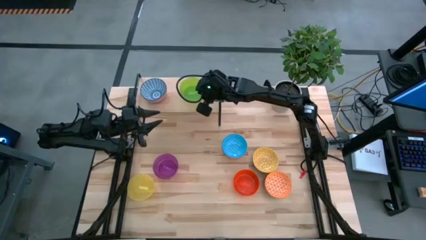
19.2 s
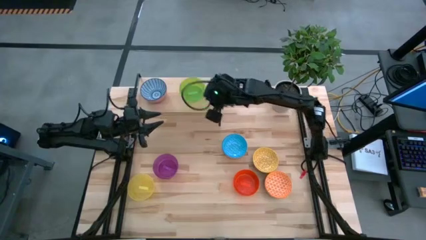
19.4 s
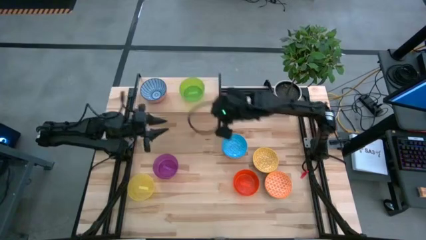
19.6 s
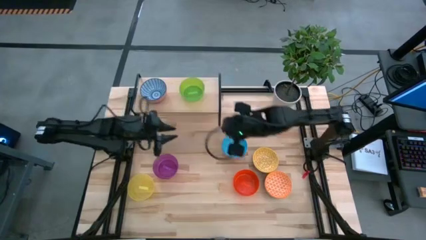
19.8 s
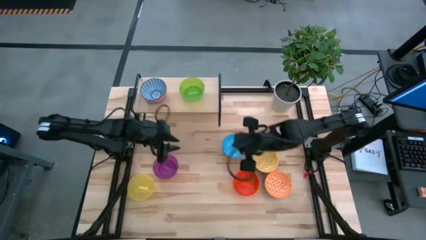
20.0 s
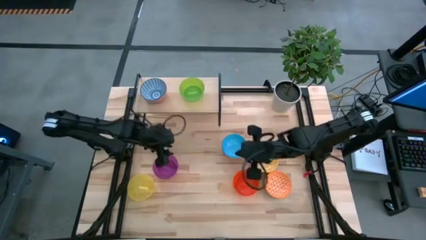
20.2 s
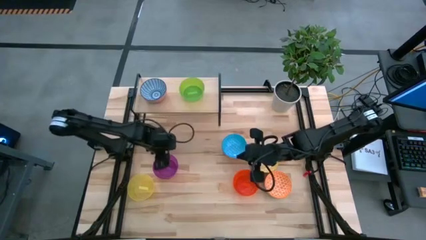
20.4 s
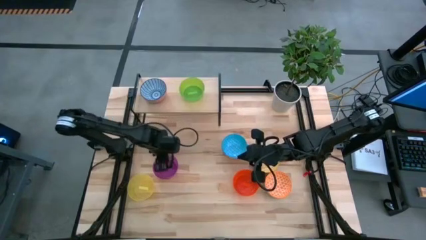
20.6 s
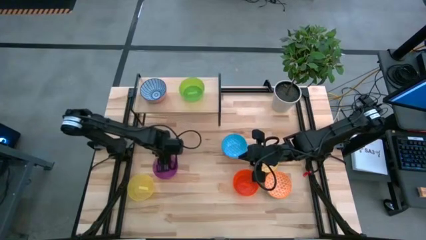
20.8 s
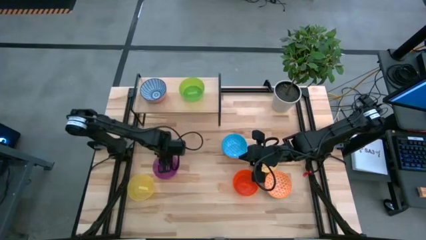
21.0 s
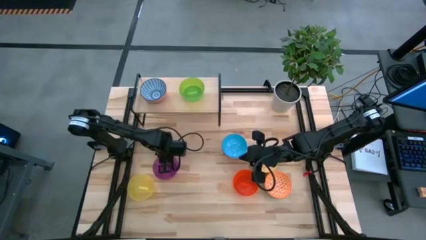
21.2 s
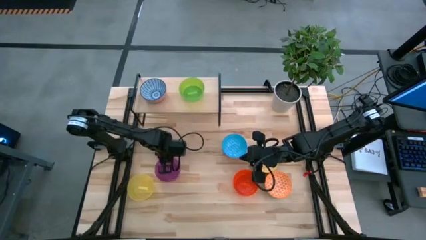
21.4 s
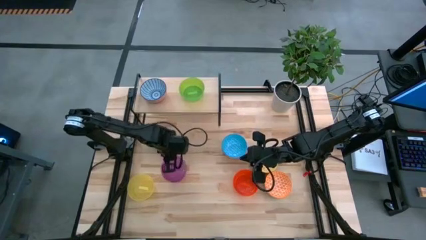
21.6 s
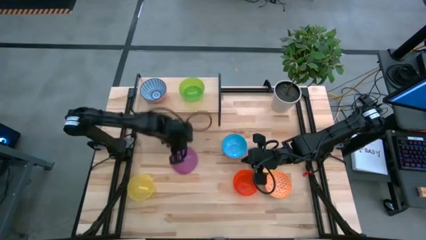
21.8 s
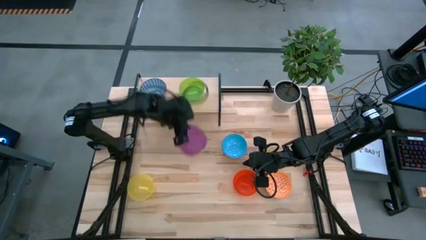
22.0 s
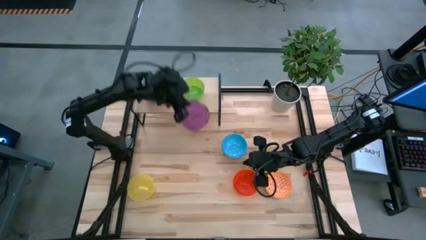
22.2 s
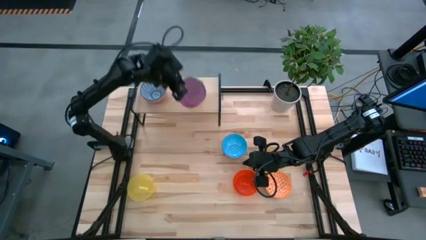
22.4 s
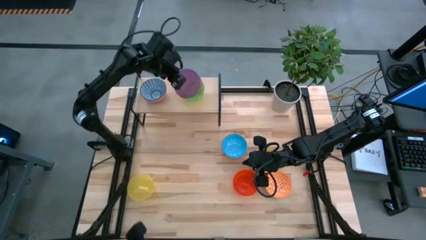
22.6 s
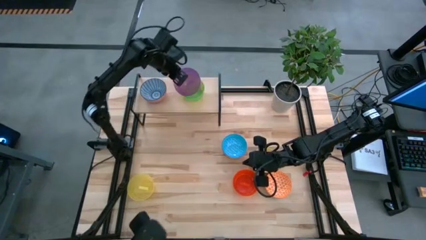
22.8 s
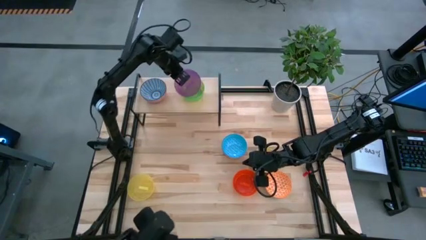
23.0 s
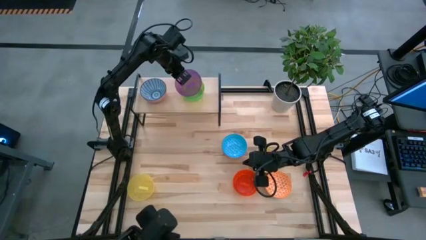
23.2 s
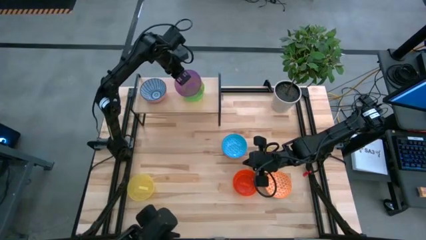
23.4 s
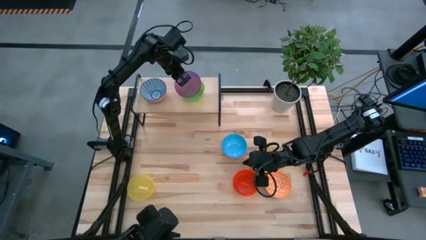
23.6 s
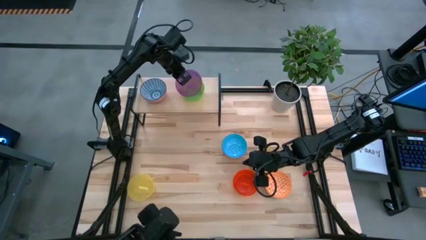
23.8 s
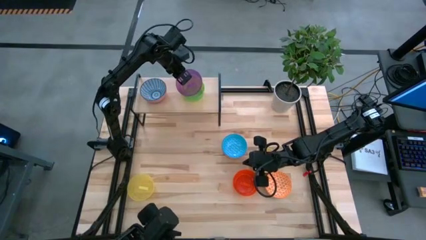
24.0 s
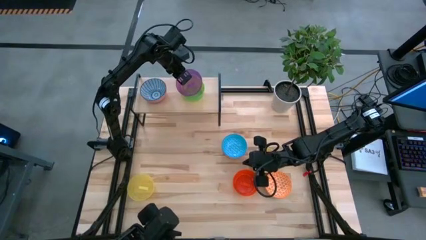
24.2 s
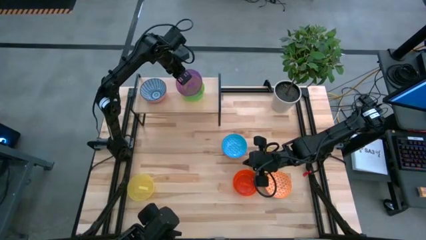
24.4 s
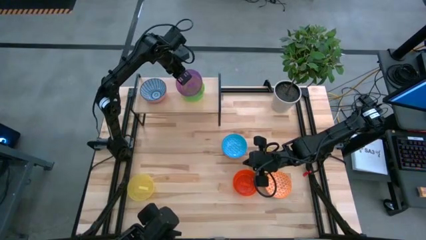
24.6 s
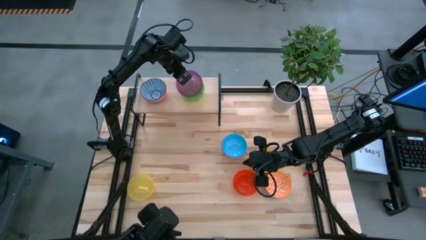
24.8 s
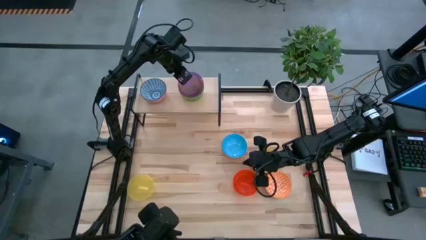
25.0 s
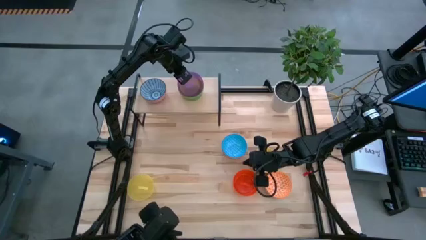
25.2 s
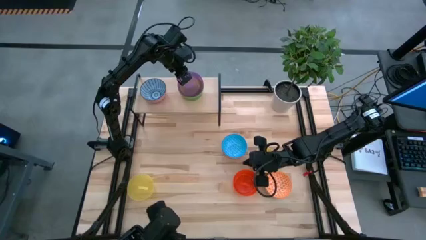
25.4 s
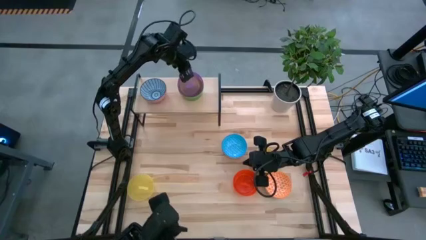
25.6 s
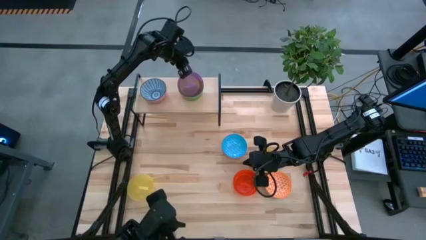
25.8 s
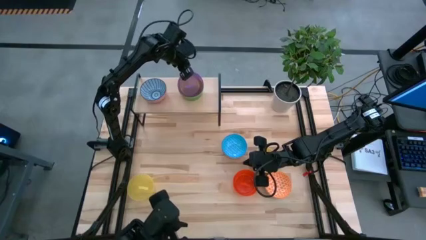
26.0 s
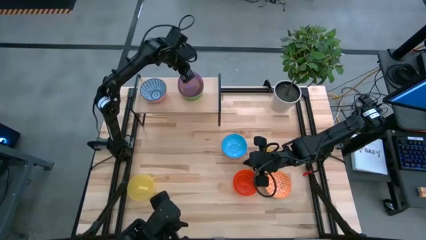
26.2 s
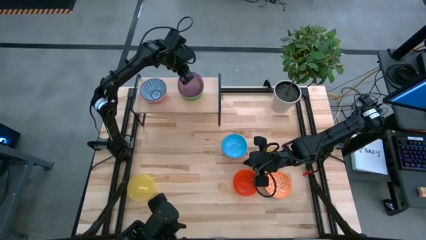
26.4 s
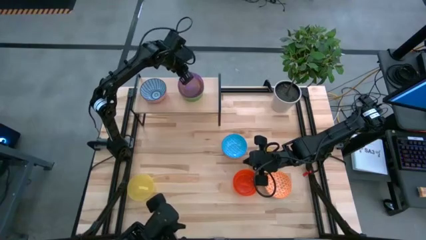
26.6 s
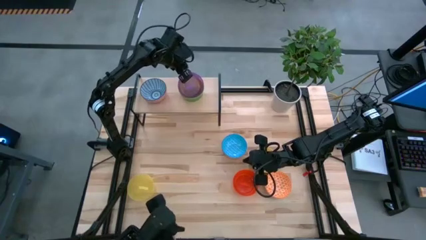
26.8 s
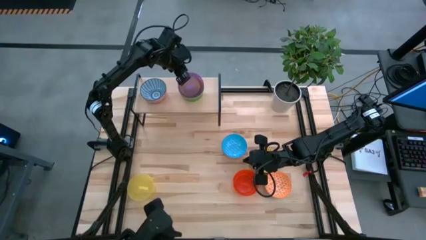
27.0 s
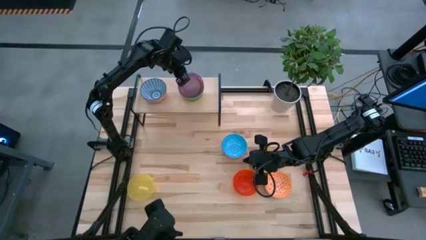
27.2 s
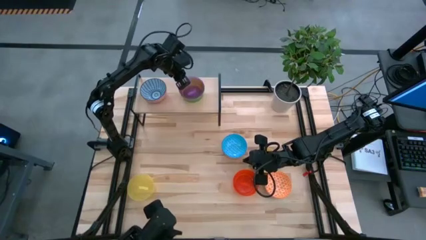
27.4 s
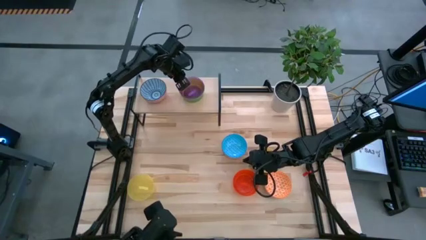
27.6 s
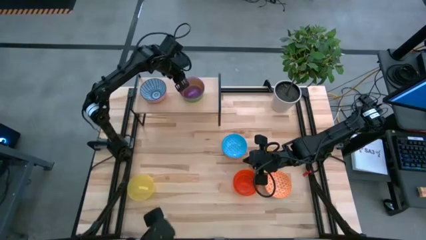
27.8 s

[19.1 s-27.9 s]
Task: Place and stack bowls onto a shelf
Stack the violet bowl on top of the green bowl on the shelf

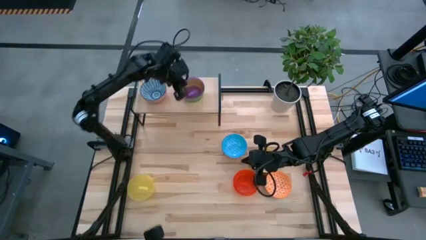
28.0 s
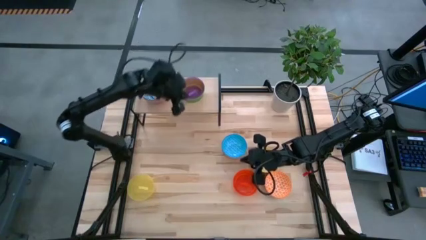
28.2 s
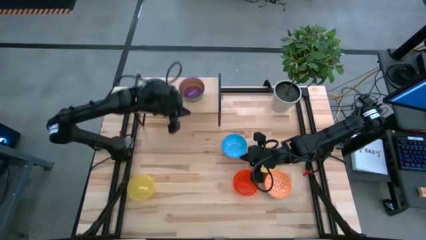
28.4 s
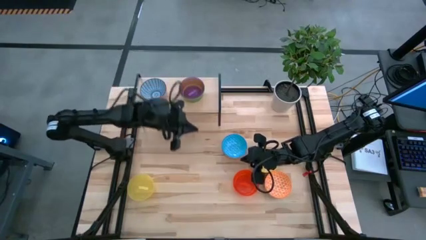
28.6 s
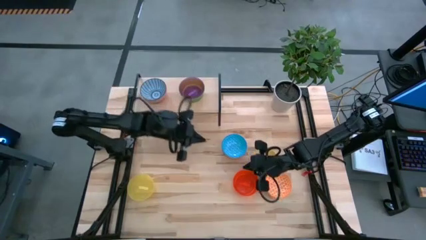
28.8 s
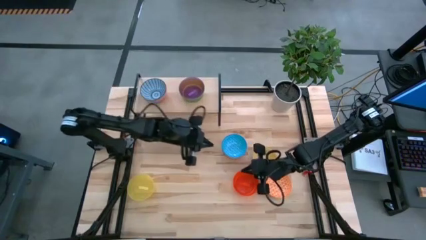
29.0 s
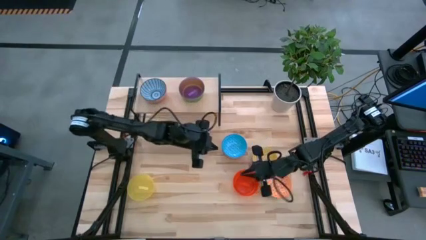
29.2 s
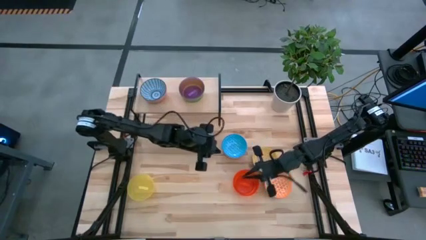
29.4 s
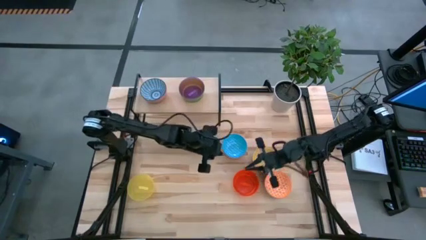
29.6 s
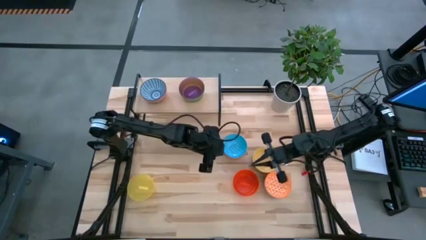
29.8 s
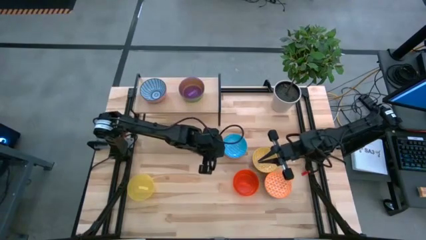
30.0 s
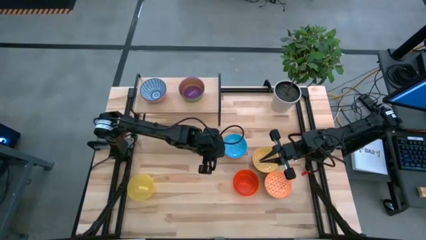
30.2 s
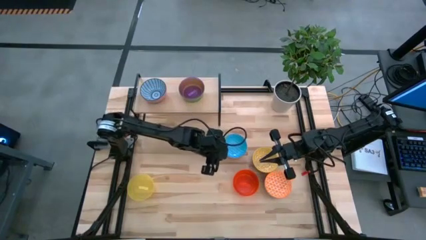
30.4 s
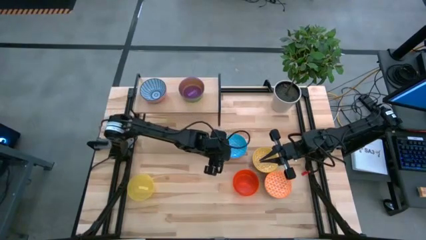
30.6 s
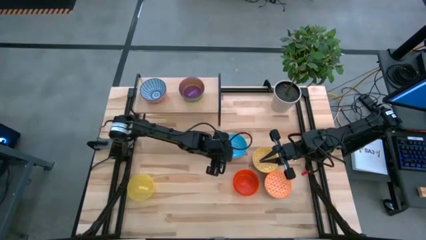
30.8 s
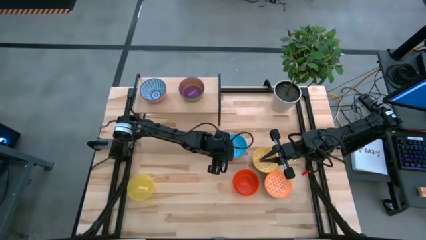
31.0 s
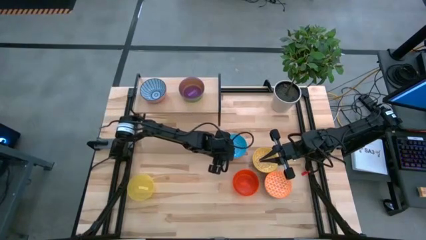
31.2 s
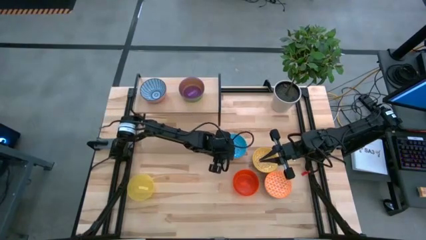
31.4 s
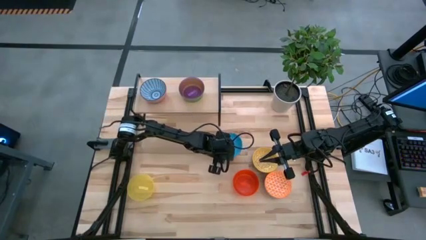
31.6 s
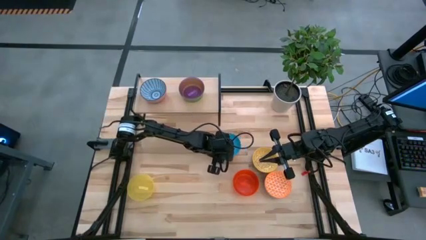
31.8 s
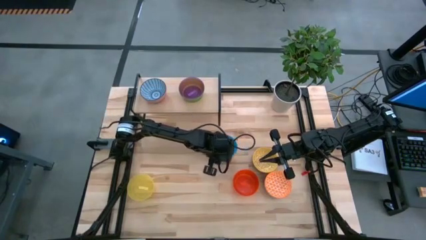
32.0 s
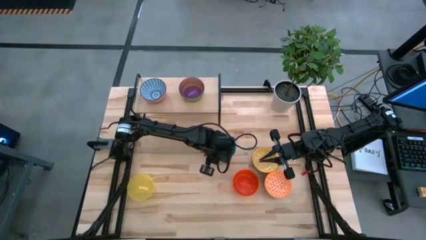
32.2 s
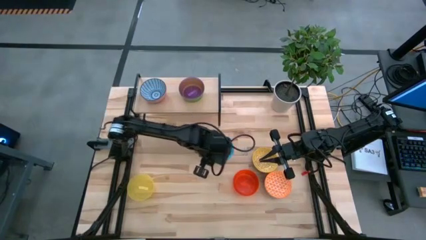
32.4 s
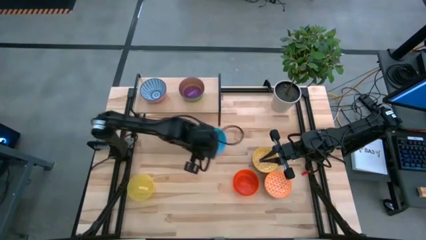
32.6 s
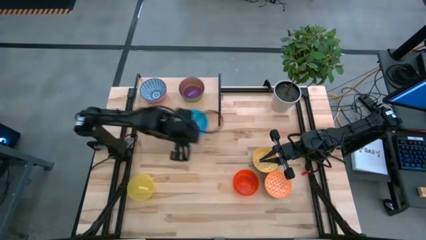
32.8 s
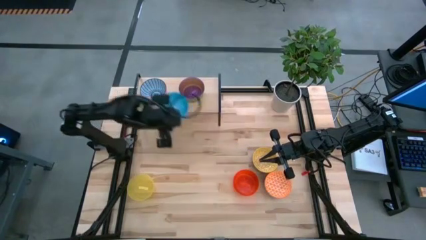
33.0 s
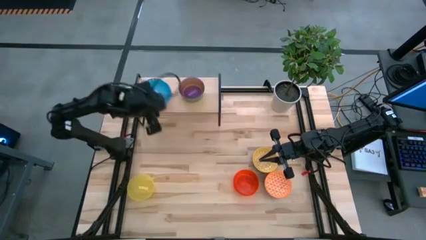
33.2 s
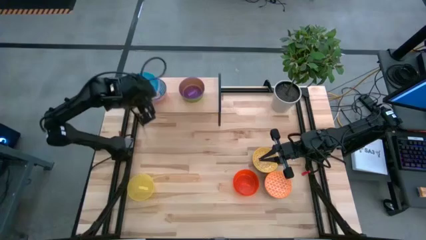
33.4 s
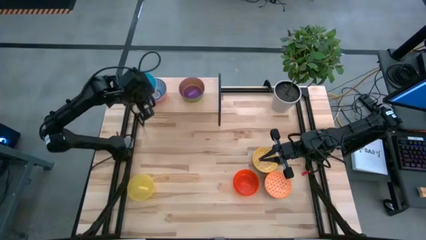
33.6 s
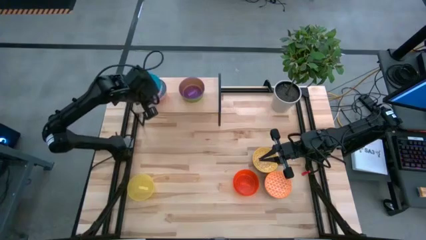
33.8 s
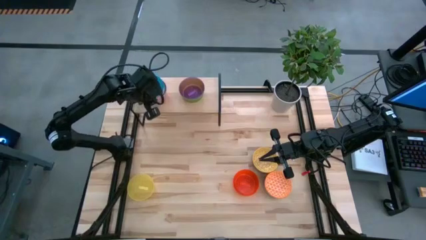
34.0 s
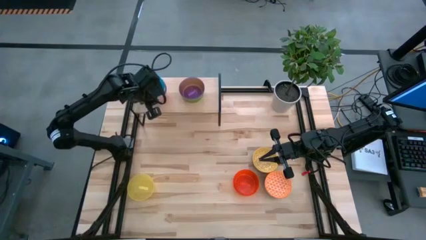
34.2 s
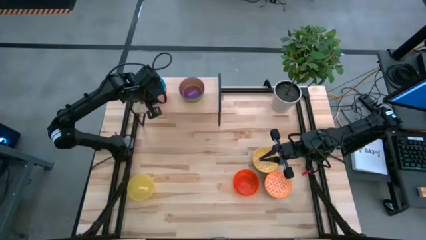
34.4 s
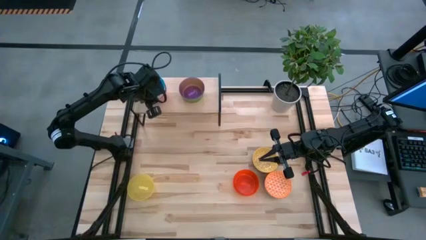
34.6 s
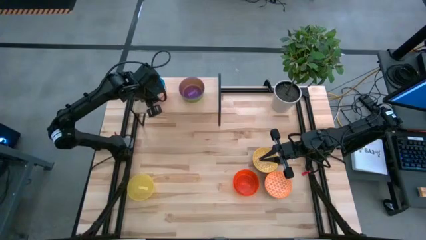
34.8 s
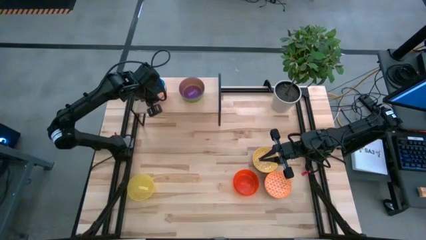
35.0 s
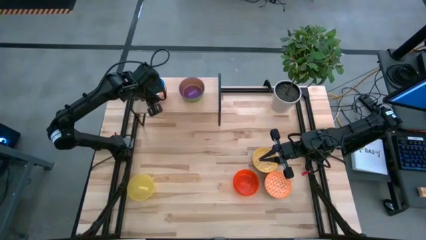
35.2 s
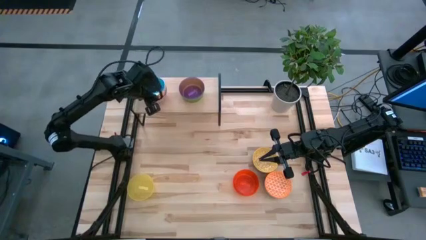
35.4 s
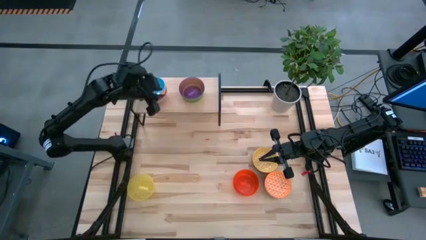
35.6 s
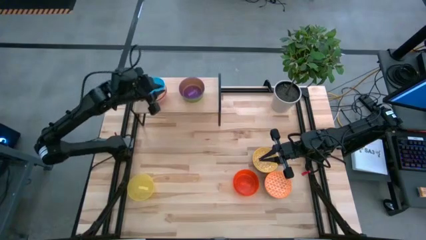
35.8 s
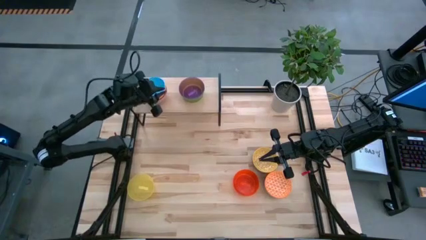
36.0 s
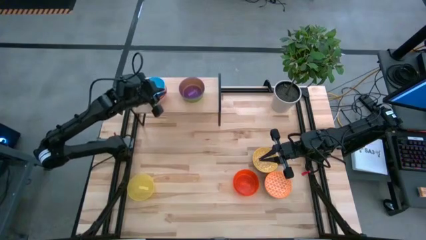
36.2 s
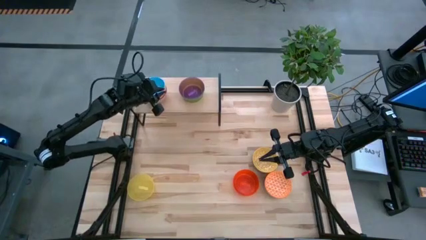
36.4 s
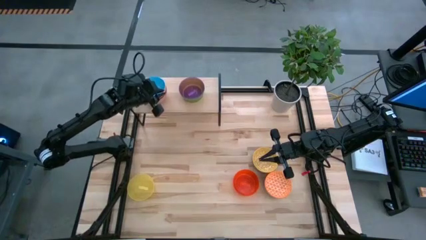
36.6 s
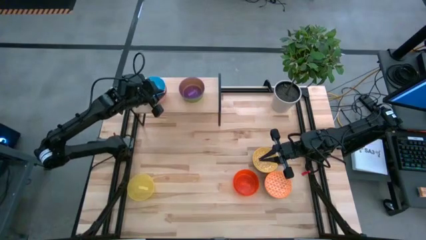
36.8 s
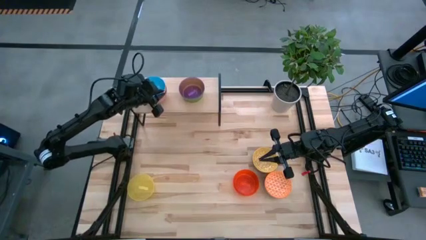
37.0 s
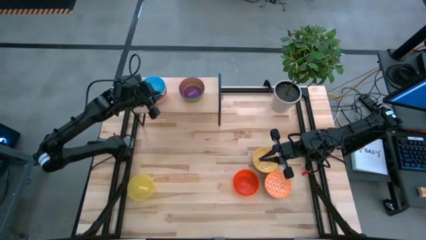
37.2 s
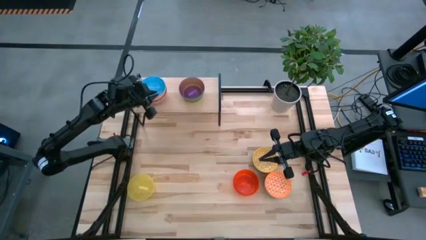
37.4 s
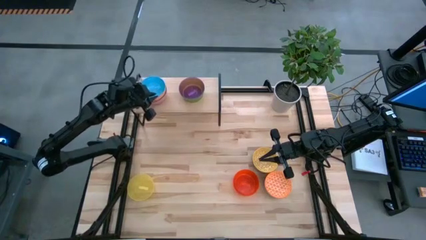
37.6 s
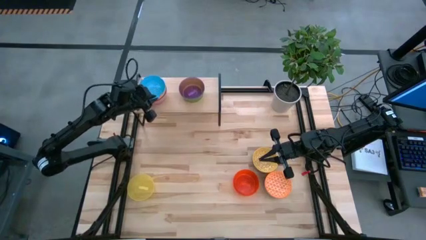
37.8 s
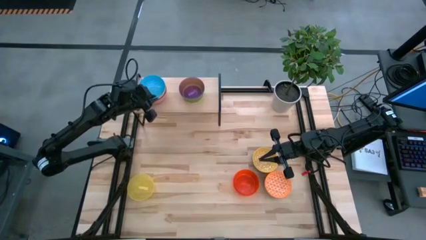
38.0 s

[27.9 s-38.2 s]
Stack the light blue bowl on top of the blue bowl on the shelf
